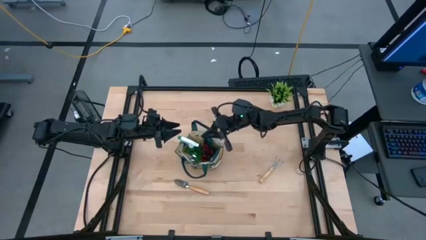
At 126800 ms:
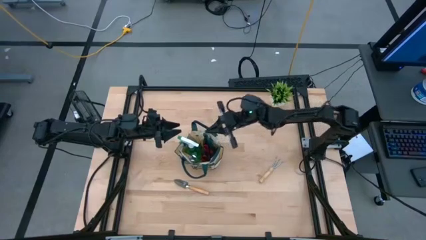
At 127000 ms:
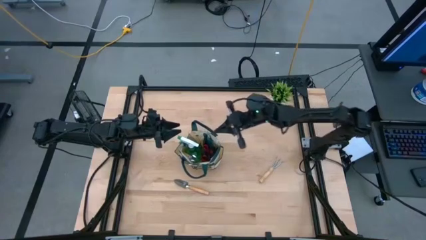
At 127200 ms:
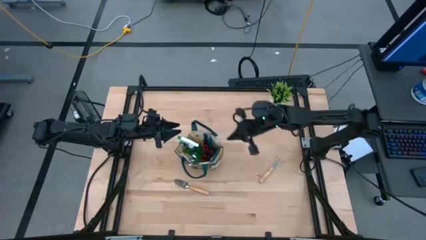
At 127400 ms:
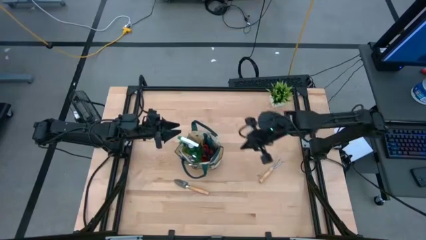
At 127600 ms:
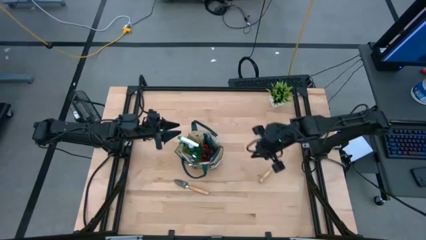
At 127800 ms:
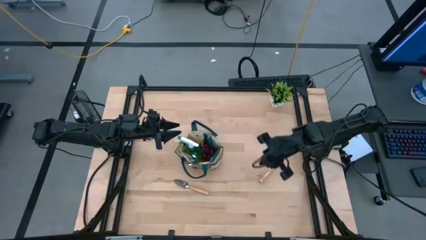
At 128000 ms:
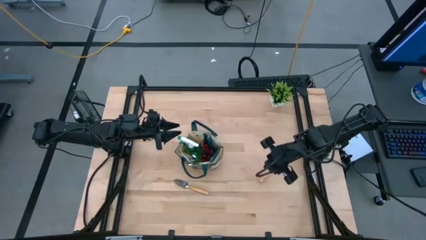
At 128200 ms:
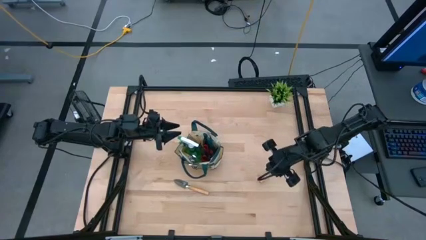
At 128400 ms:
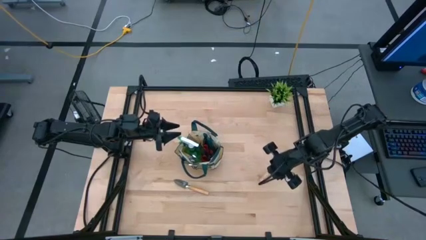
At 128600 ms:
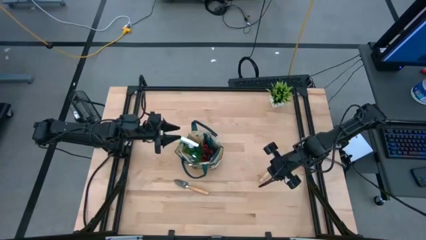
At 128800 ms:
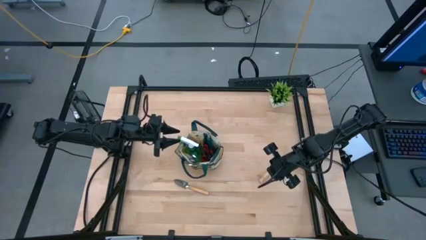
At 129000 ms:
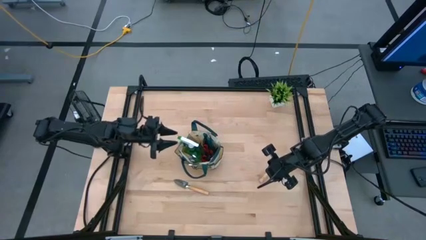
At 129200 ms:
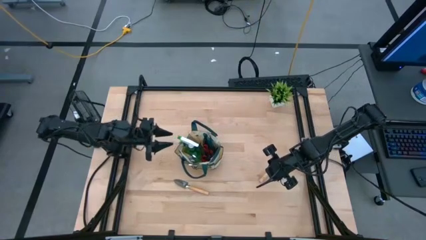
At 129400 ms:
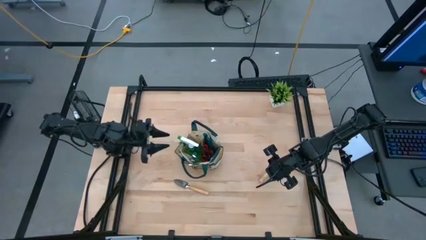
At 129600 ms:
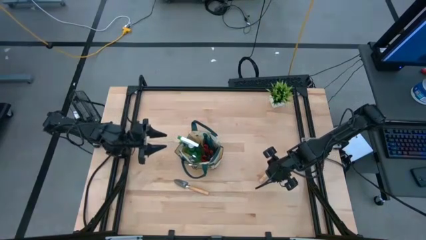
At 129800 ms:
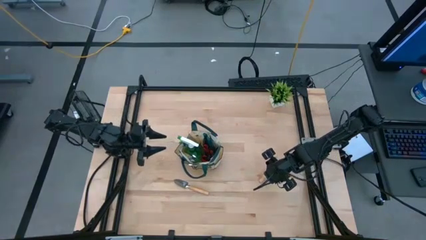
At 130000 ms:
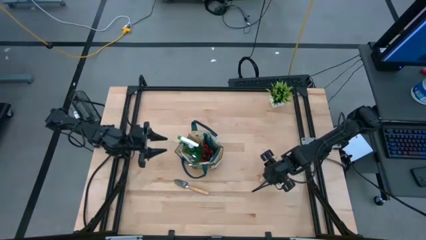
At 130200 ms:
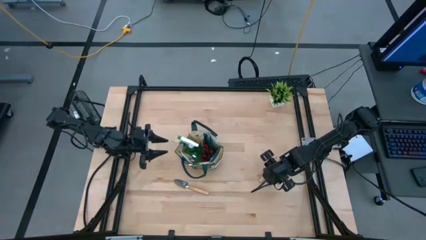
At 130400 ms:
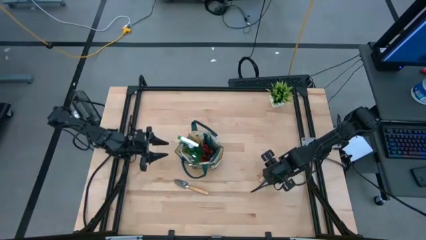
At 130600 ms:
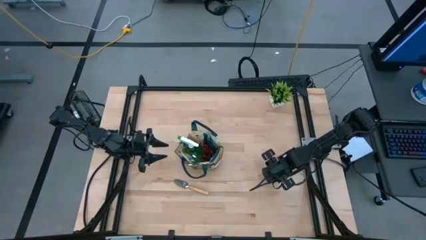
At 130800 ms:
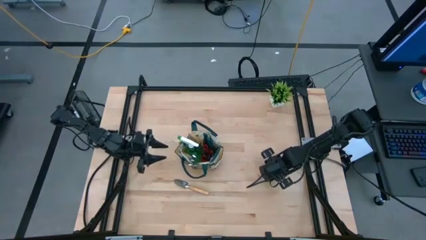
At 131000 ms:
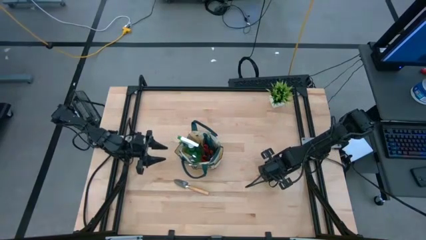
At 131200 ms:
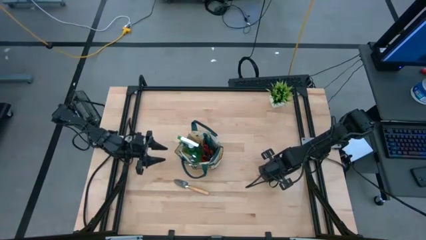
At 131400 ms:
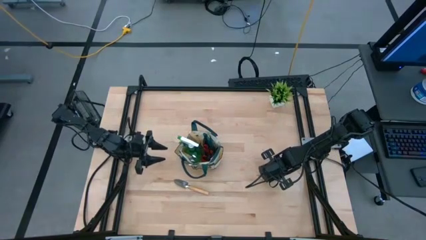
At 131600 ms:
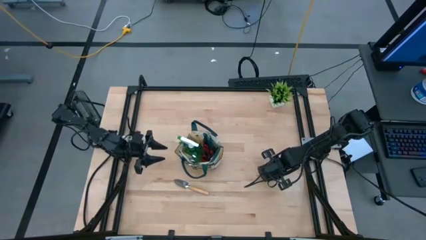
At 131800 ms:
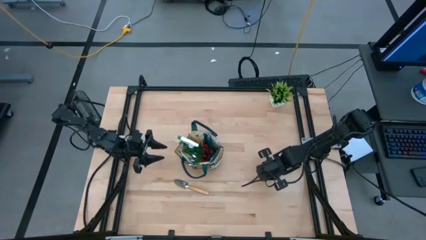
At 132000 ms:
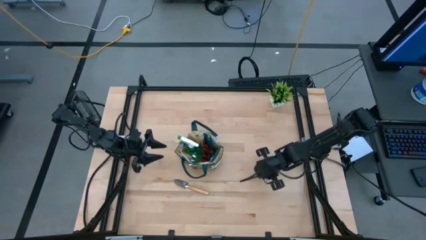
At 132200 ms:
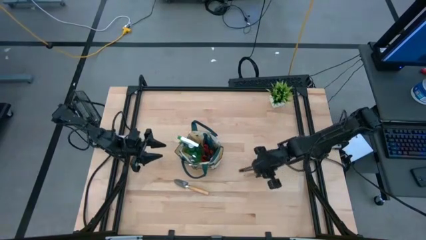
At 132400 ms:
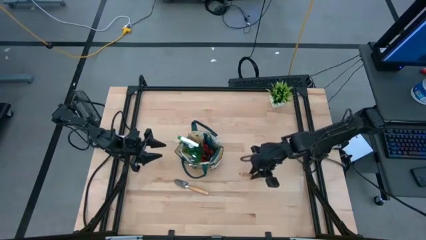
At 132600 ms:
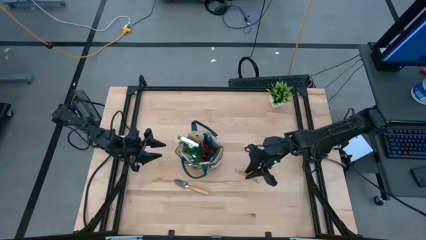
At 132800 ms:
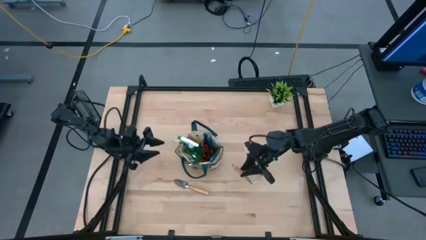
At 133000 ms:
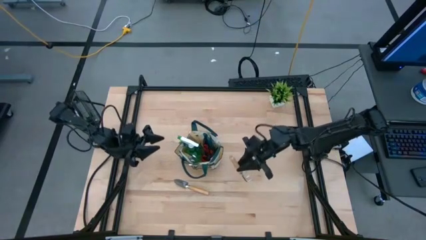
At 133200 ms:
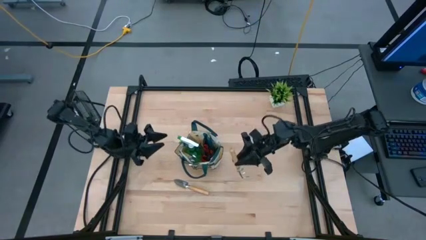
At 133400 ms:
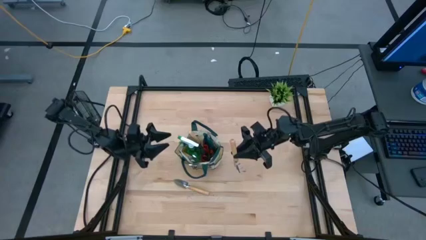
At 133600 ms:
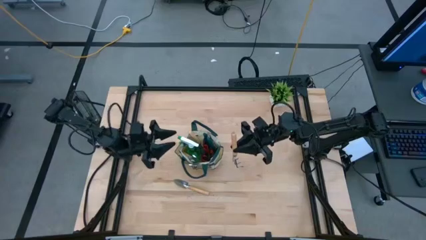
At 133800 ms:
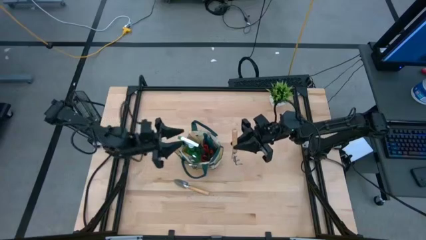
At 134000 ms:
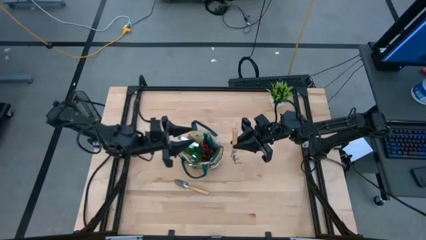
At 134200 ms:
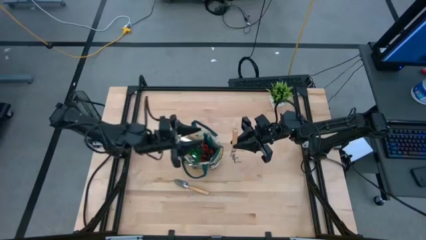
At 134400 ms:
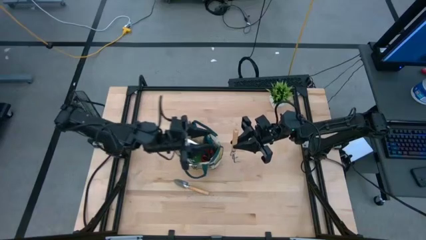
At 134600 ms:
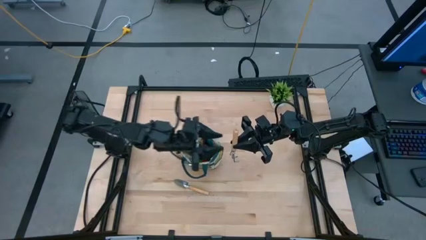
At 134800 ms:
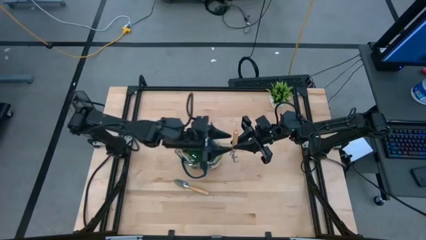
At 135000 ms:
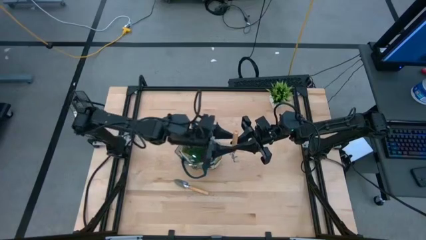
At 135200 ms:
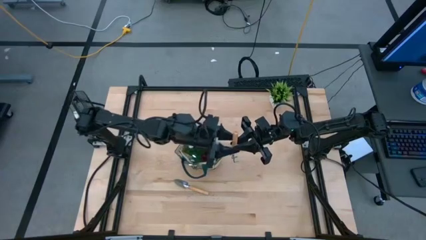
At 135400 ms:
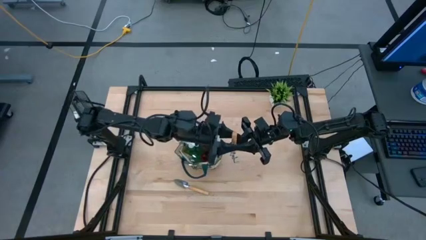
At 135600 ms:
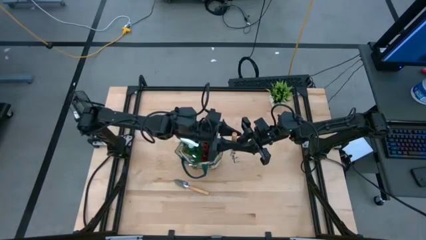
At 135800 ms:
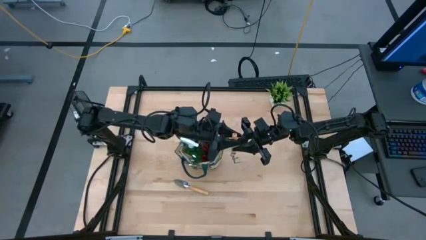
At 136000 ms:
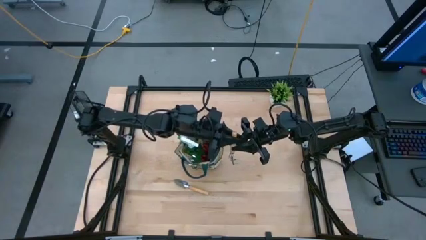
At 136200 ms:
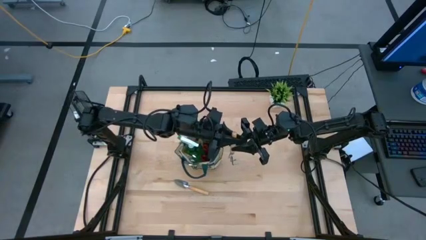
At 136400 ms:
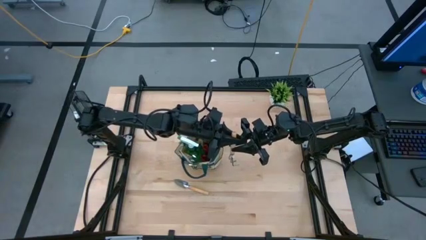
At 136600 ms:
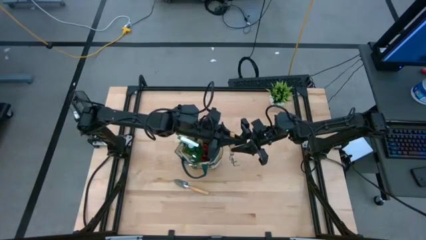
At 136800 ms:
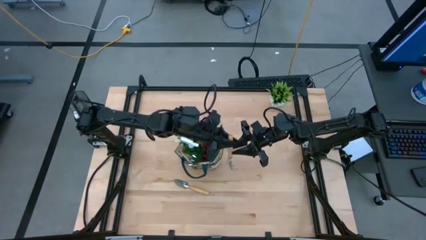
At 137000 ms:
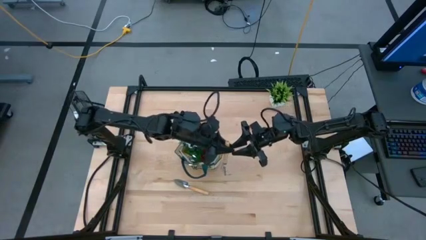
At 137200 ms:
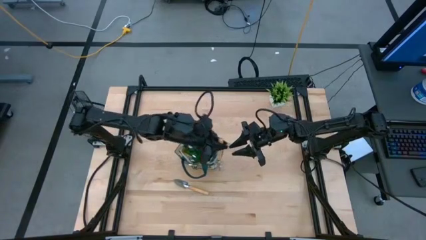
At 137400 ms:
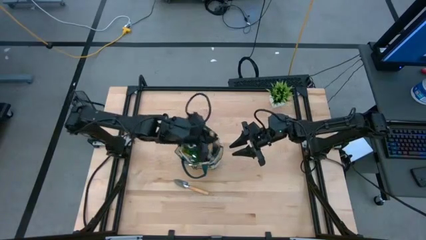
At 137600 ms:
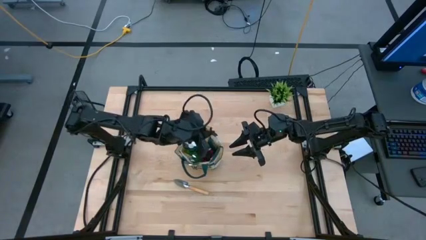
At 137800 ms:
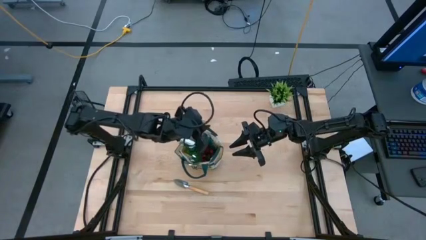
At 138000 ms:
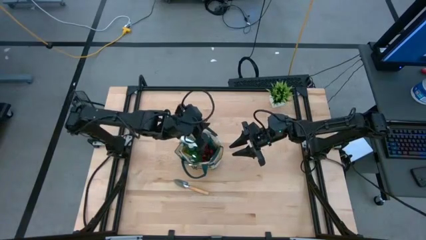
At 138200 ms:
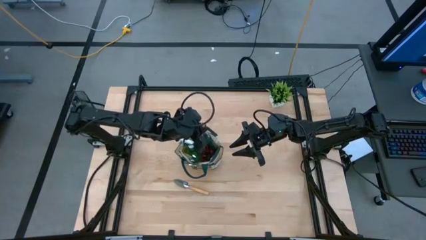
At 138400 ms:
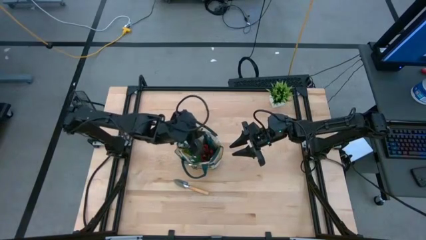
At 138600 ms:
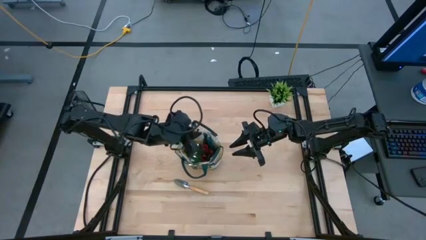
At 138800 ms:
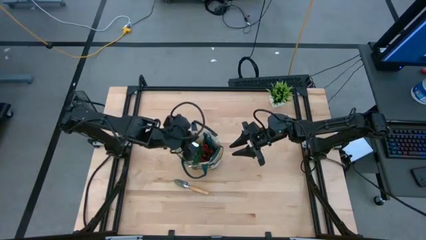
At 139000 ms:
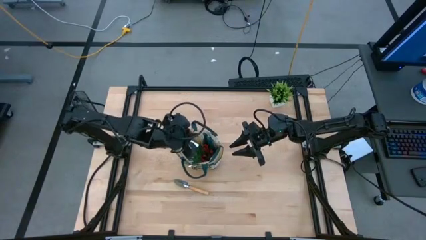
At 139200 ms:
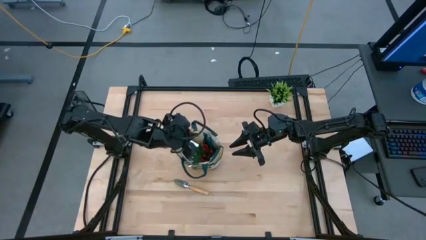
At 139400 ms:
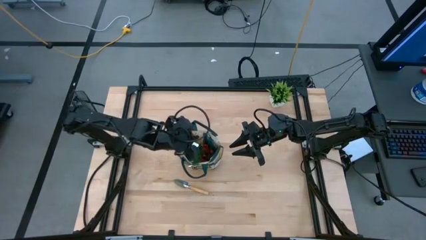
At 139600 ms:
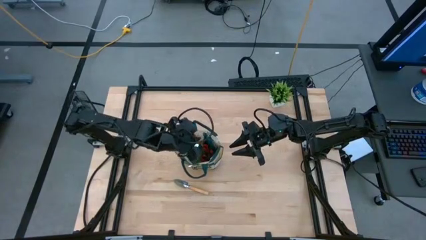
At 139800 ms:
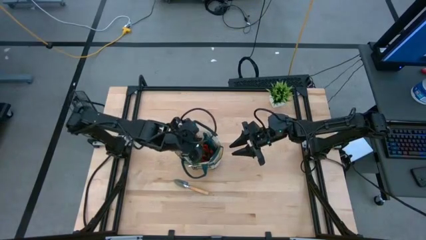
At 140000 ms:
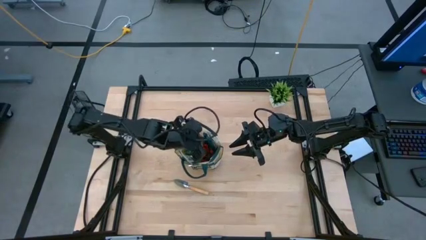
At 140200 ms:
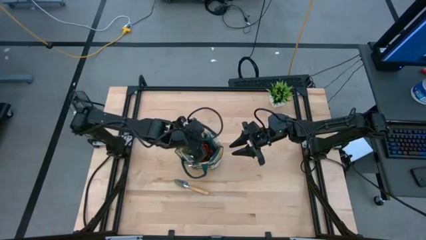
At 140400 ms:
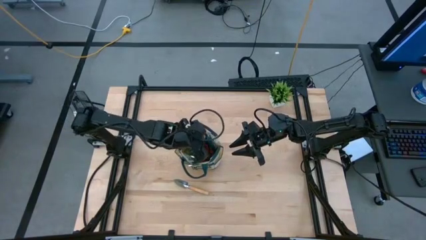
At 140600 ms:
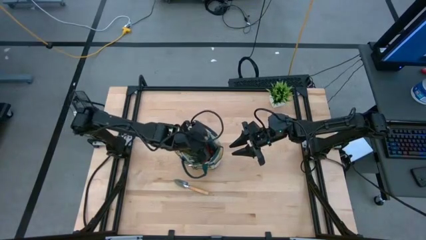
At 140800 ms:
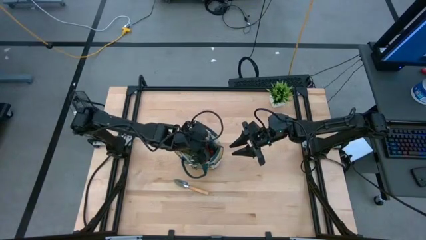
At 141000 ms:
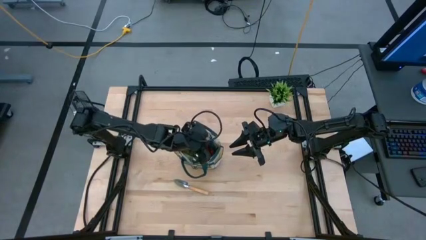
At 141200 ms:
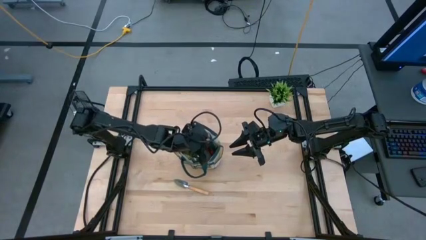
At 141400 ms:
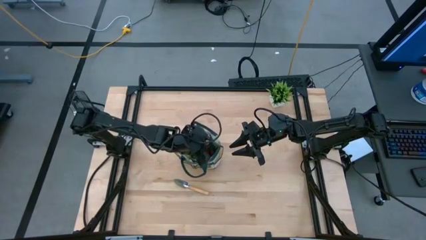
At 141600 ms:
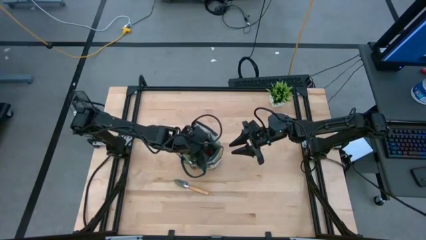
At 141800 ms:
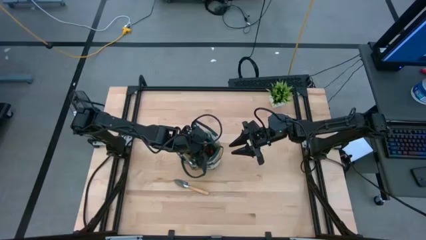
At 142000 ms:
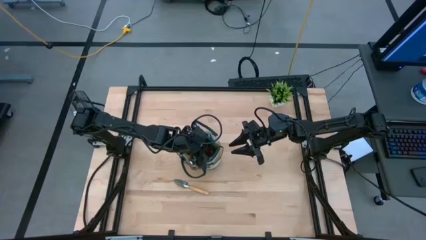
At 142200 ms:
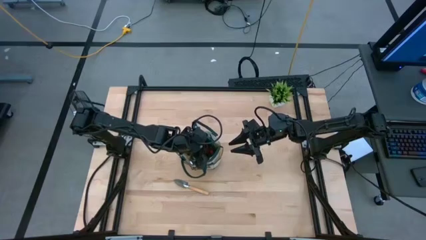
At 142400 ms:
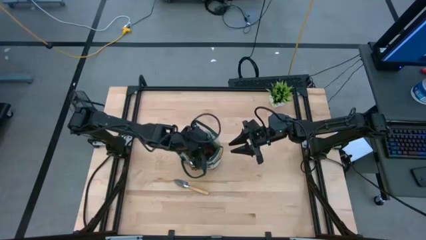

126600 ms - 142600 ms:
Task: Pick & Place Garden tools in Gardening bag
Put the brown hand rake into the gardening bag
